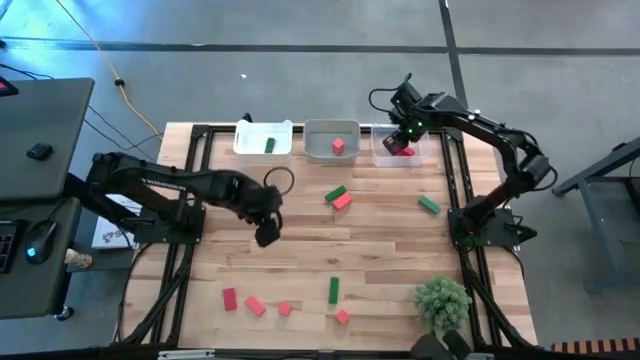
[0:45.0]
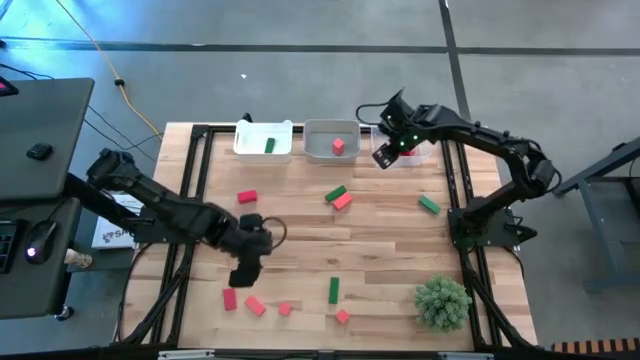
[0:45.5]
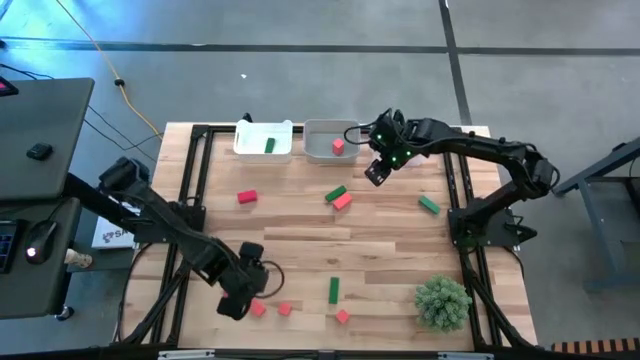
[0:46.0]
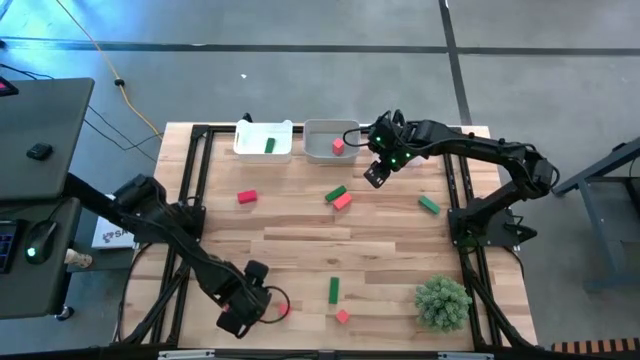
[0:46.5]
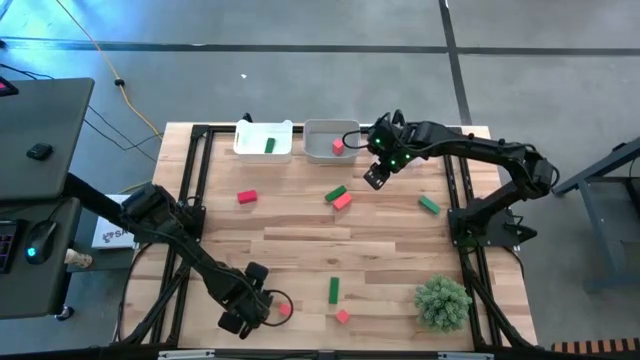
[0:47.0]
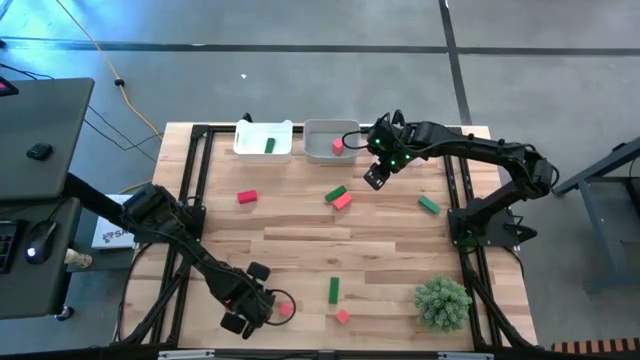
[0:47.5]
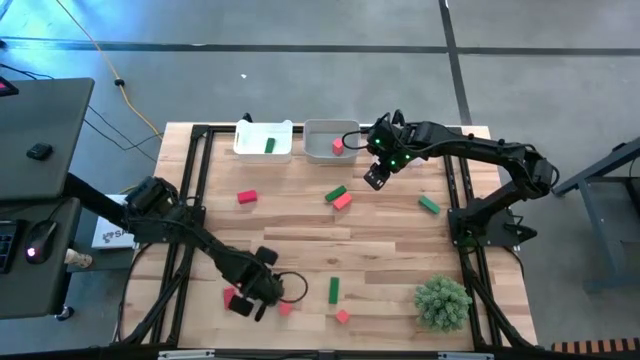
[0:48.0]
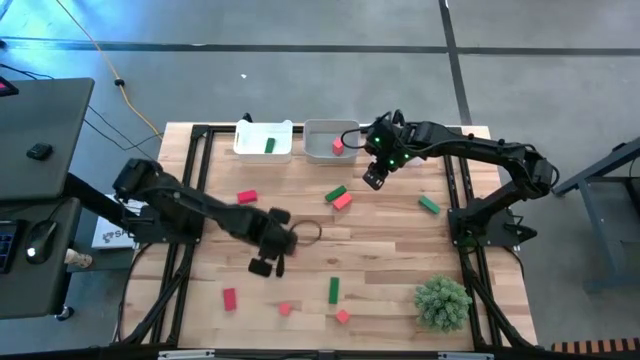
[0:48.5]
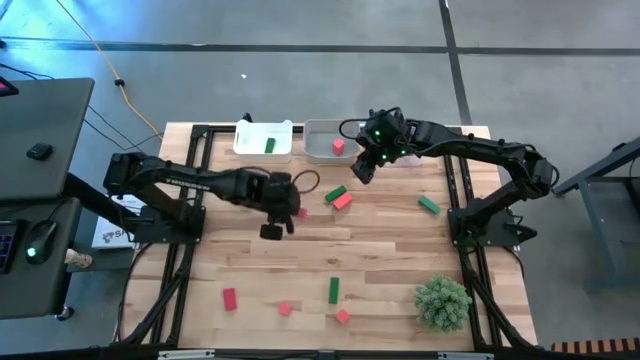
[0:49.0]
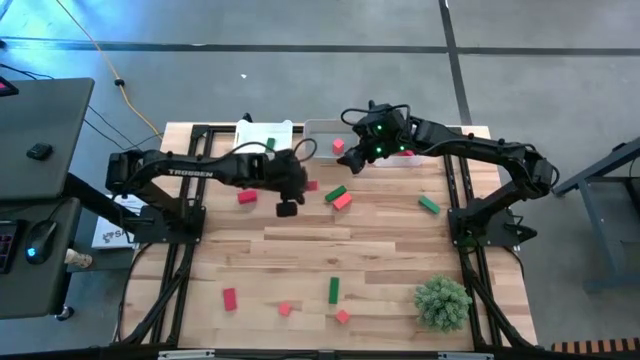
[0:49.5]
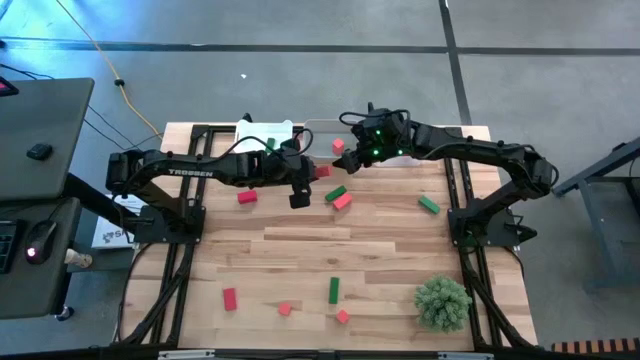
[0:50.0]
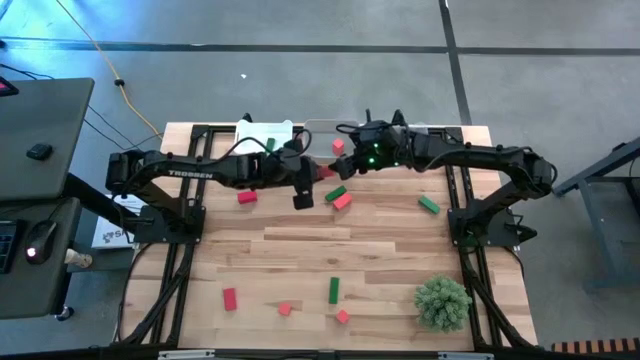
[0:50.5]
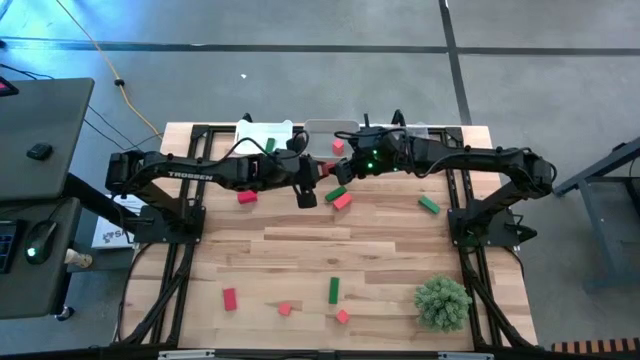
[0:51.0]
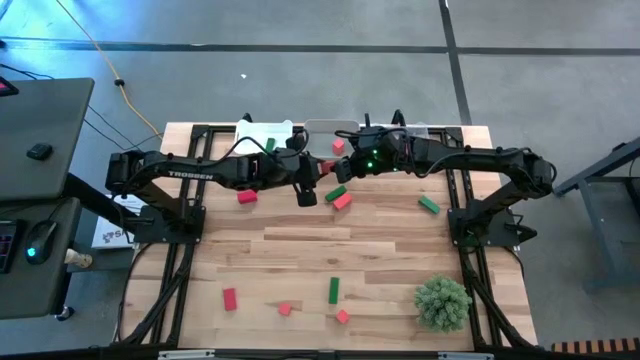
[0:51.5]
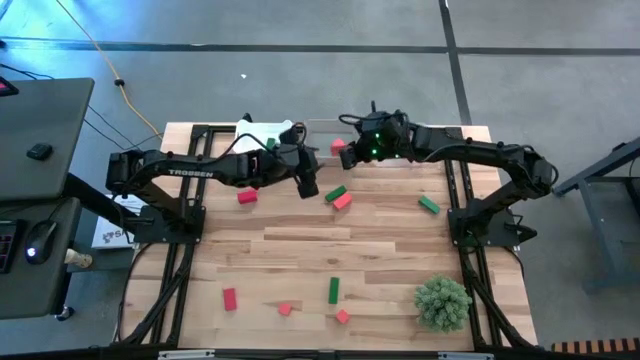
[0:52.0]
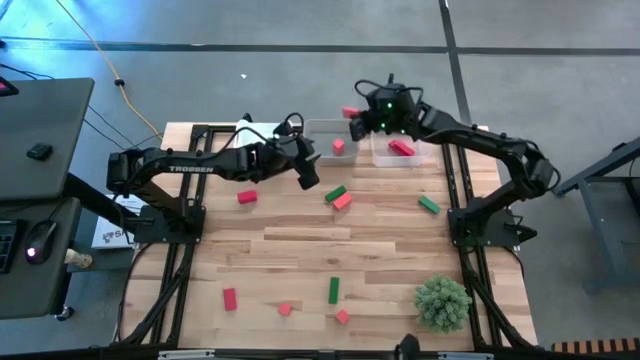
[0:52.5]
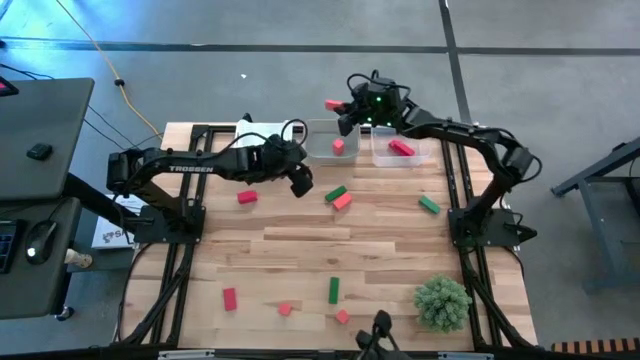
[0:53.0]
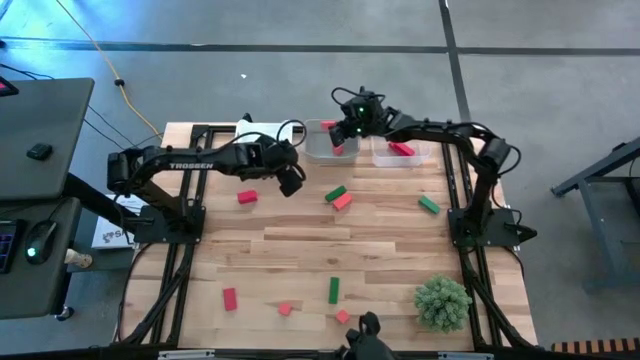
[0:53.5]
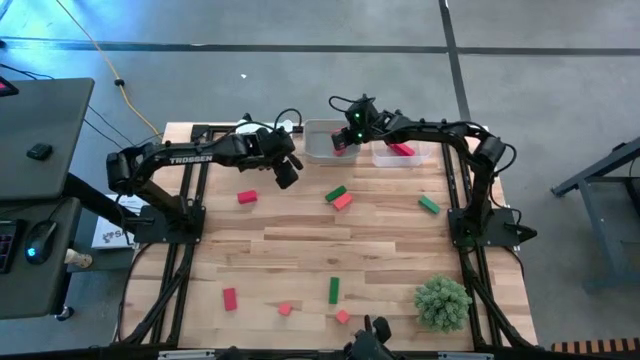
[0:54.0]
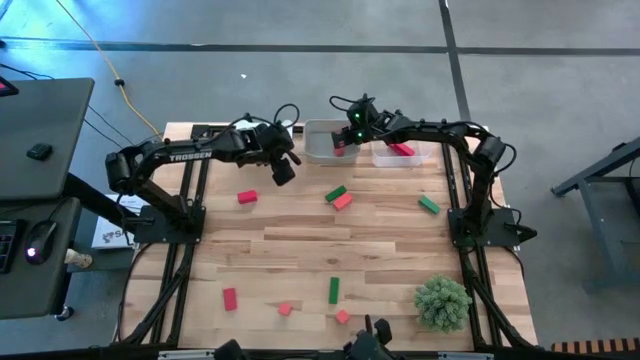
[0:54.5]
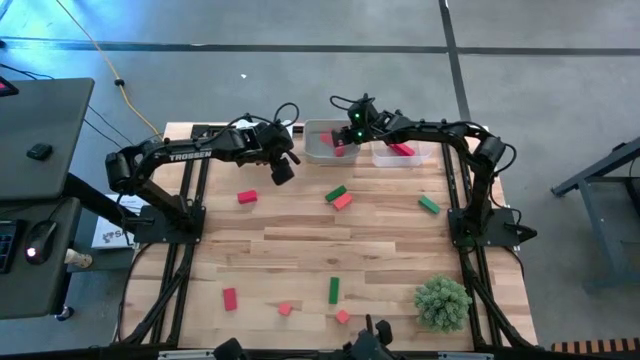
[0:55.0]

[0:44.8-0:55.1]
Task: Sort & place blocks by color
Put the orange wooden block into the gray bin

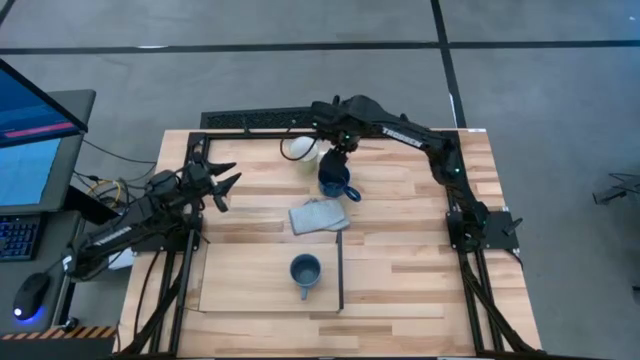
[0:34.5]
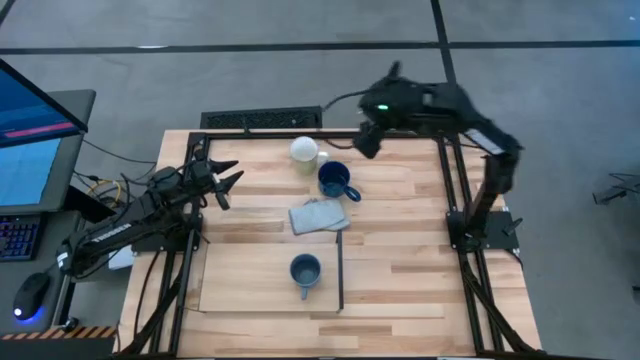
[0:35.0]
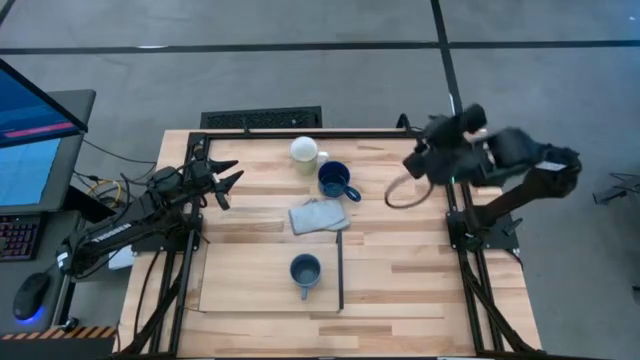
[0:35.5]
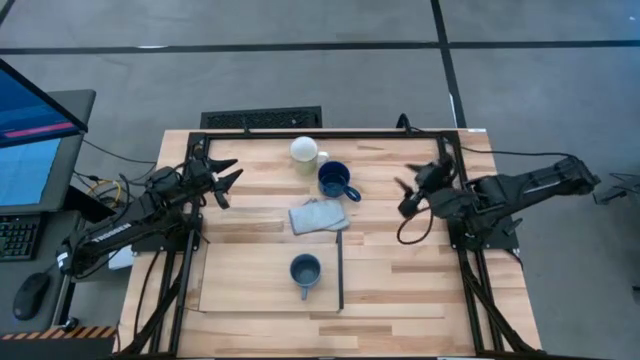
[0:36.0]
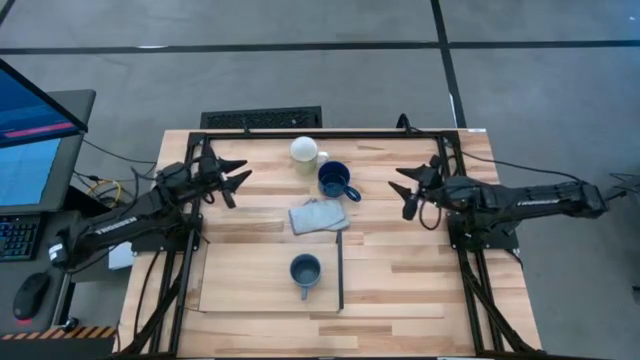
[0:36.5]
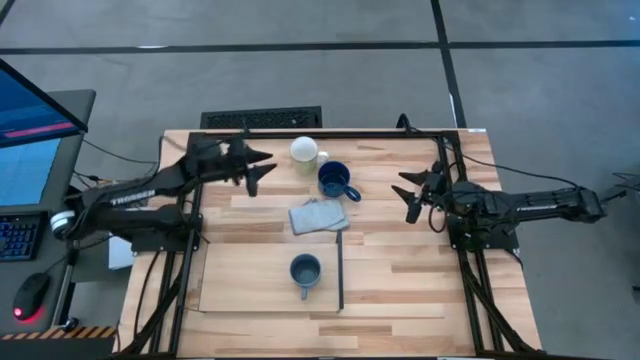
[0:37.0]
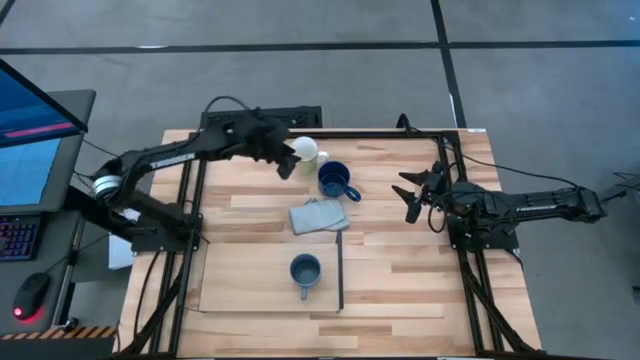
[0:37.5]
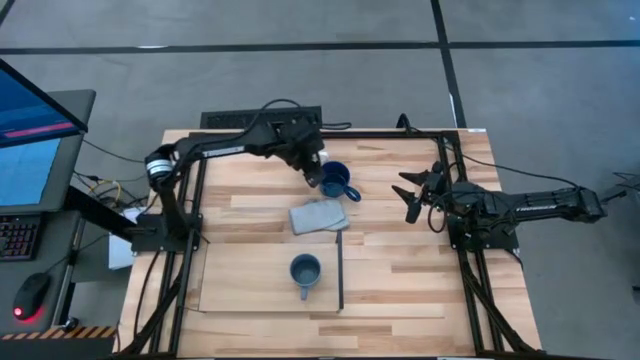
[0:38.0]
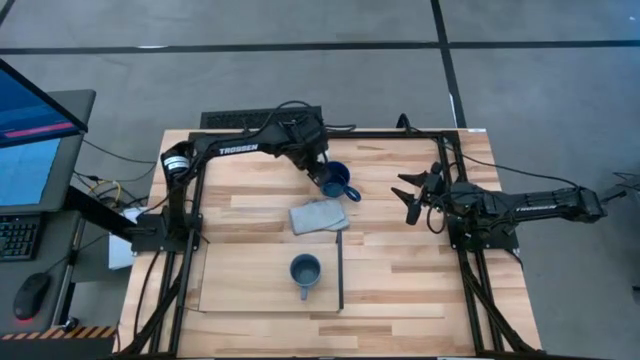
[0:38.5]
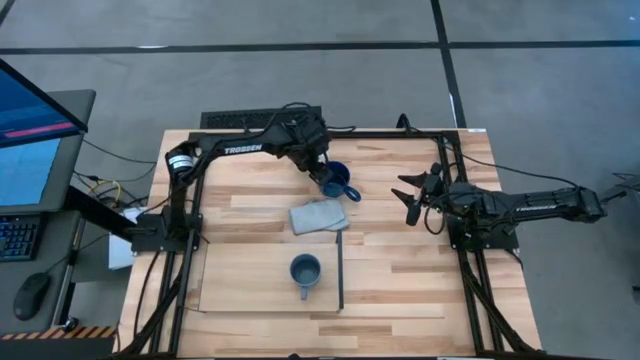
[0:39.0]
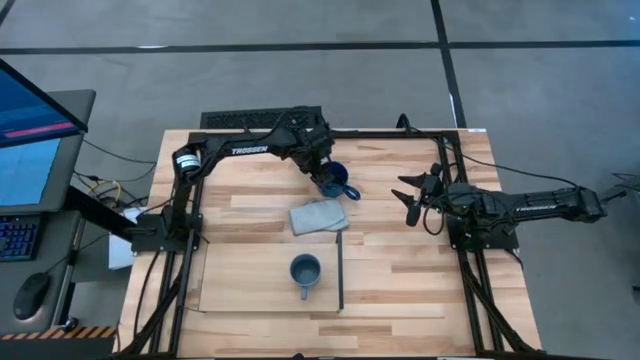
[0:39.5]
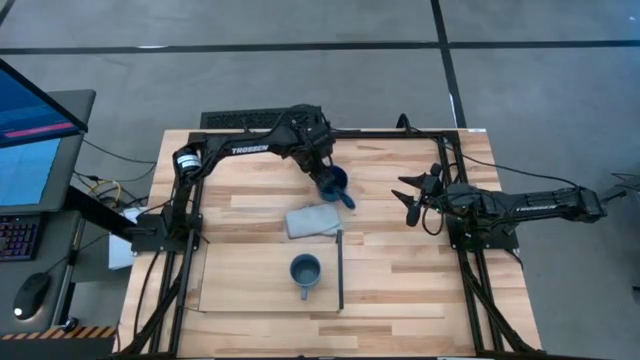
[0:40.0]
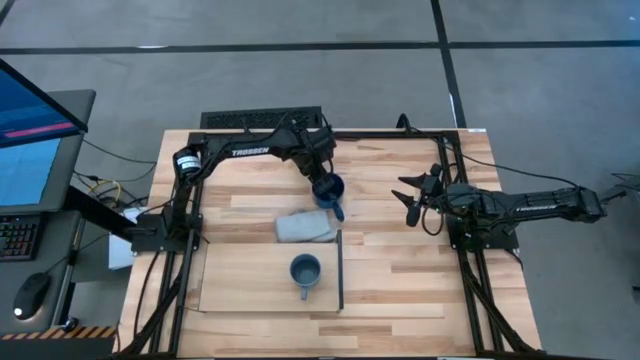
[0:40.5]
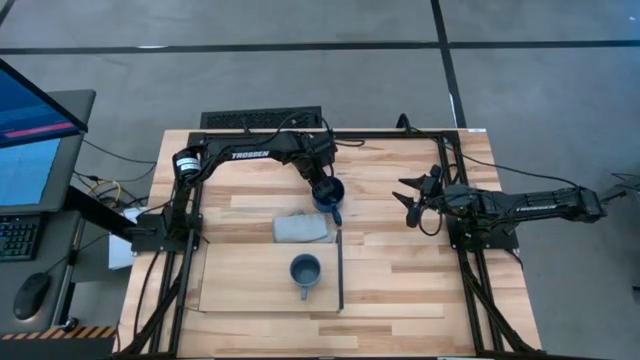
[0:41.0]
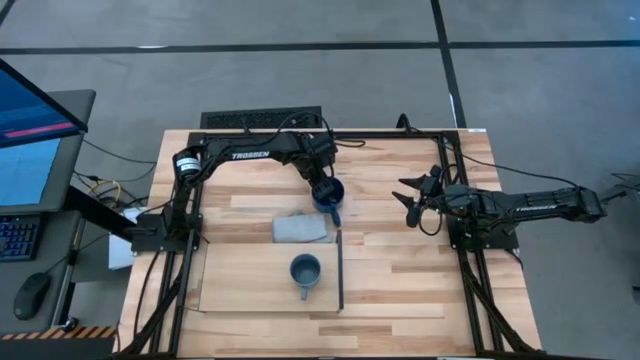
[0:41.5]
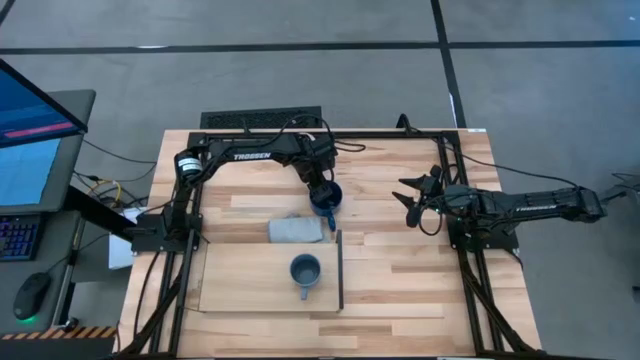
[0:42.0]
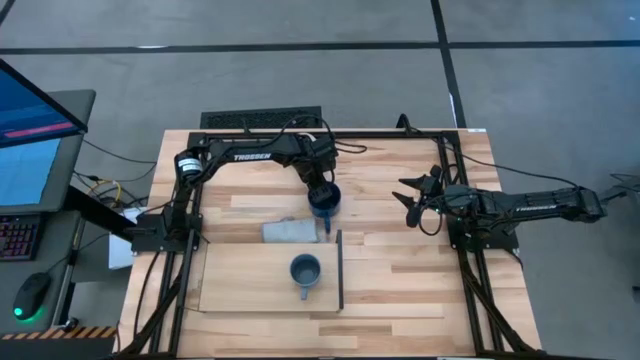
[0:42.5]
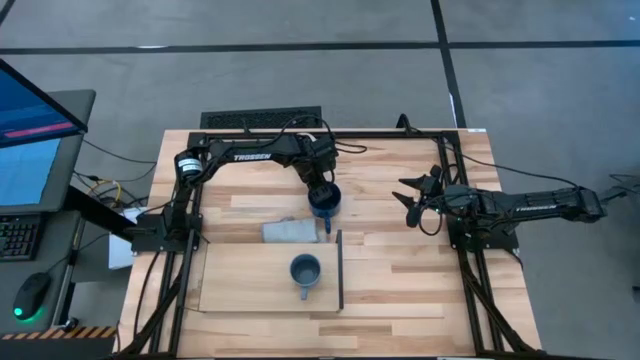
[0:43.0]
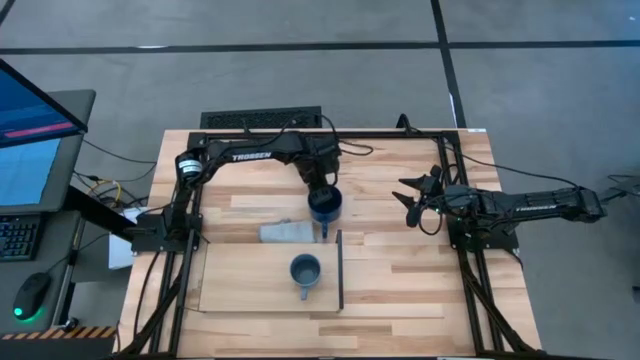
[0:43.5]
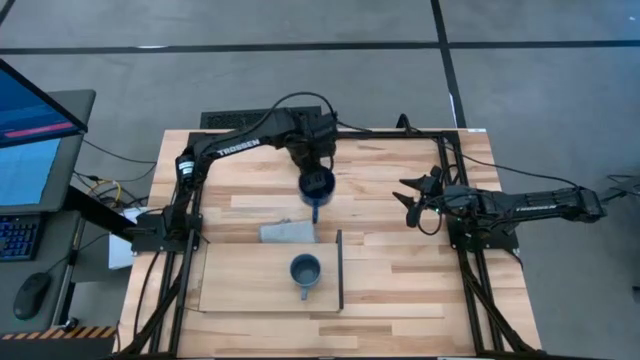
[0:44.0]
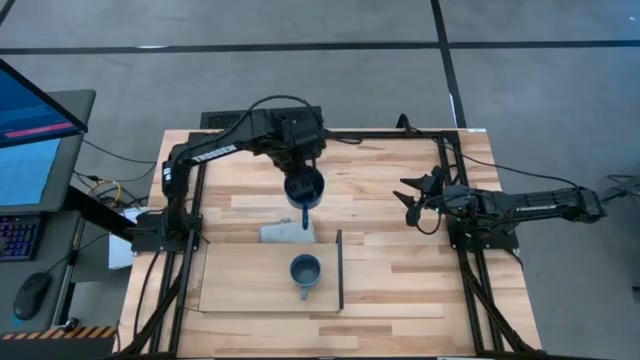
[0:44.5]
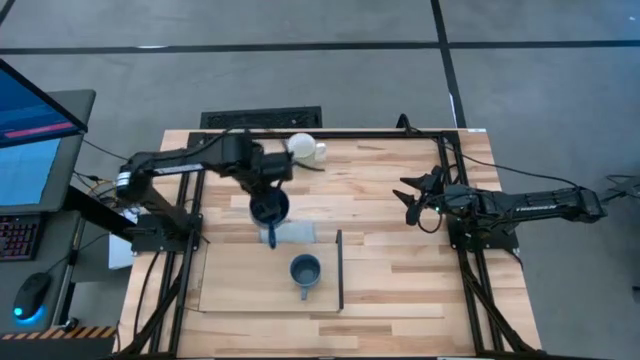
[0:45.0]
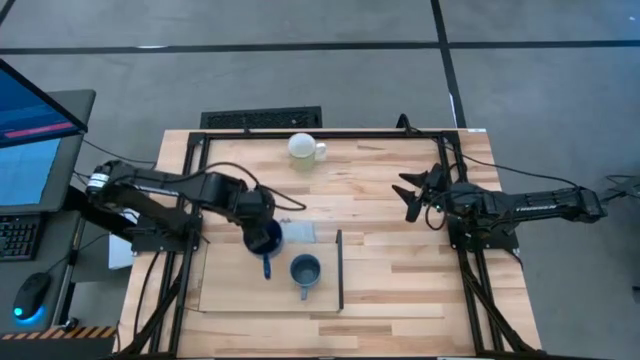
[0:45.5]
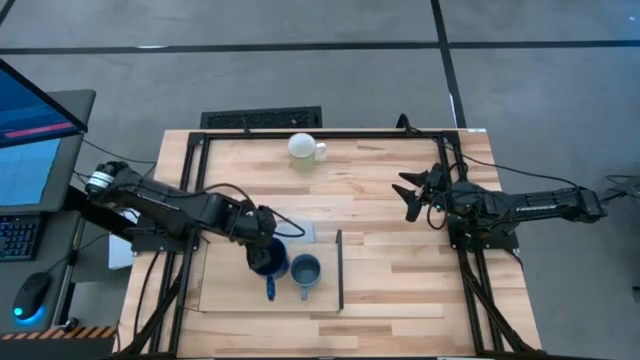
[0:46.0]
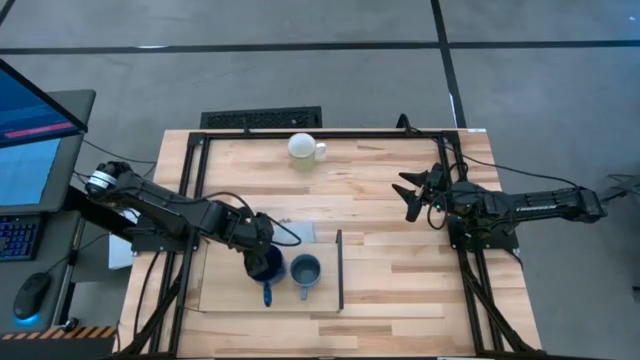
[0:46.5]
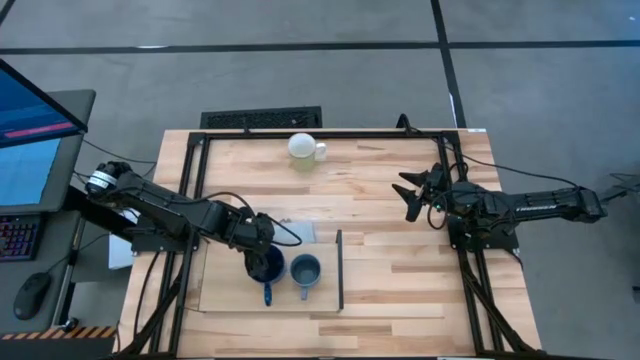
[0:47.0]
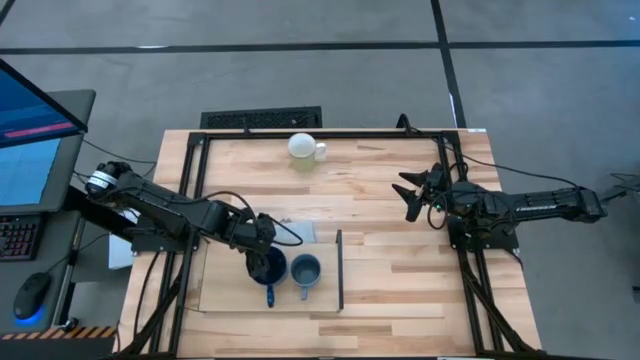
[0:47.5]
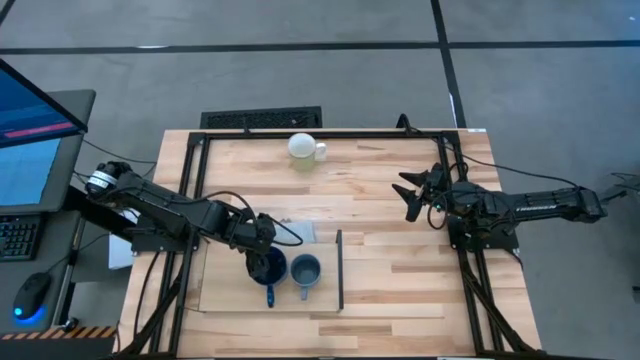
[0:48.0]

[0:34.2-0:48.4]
Task: Stack small to large cups/mugs on shelf
Put the blue mug on the shelf
